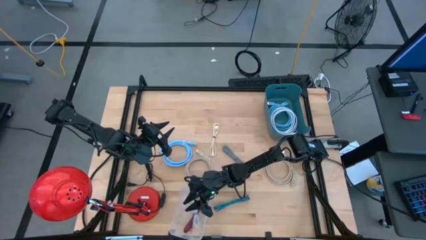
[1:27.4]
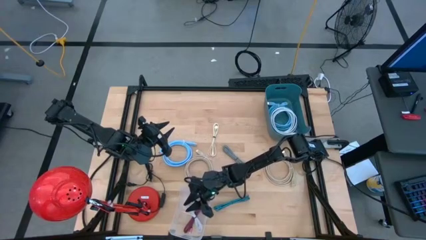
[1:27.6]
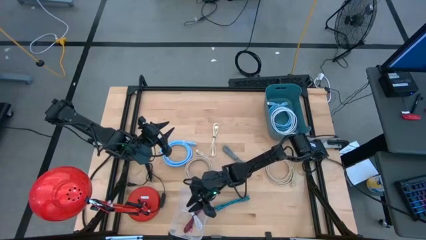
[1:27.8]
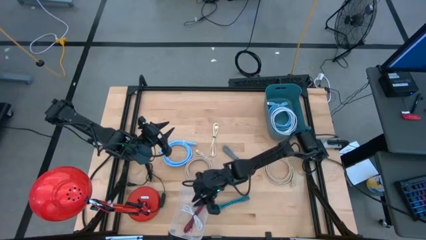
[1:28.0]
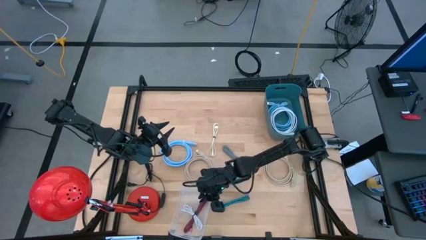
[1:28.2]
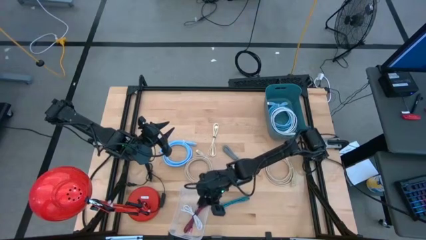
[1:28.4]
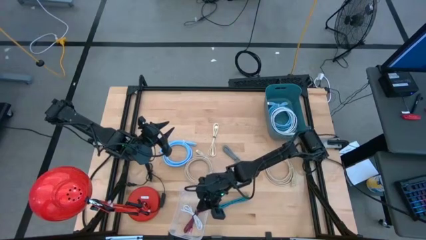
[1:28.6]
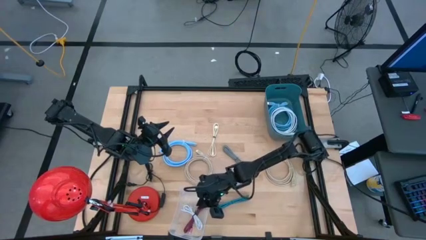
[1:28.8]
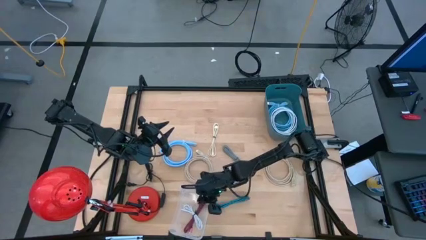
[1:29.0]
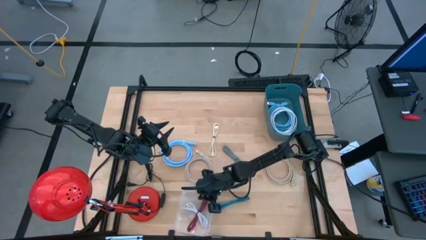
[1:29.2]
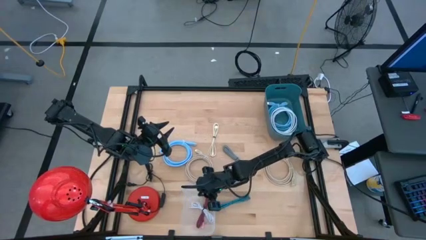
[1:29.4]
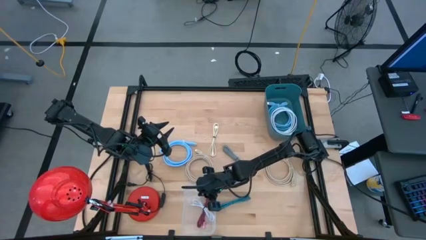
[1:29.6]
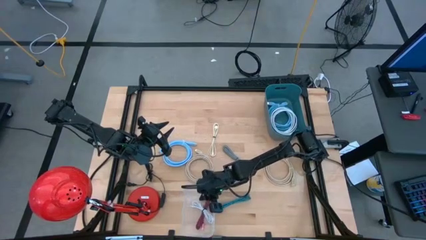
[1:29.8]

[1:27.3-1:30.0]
Task: Pick & Place USB Port
Adjust the transparent bin on the table

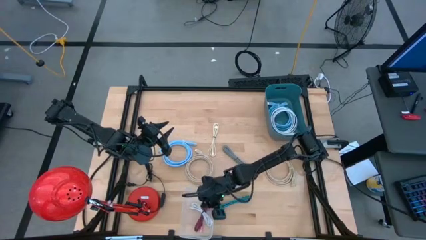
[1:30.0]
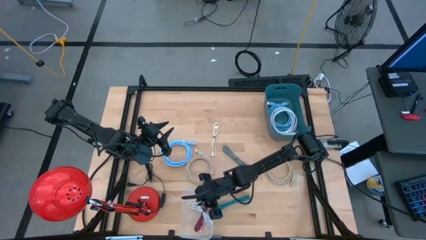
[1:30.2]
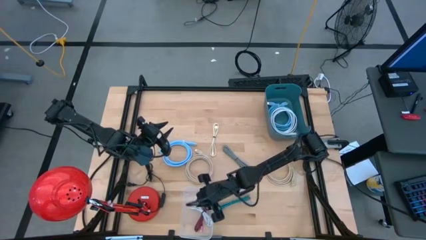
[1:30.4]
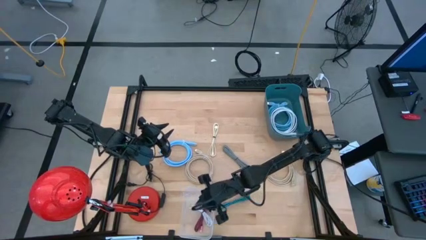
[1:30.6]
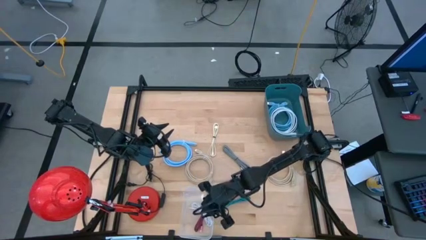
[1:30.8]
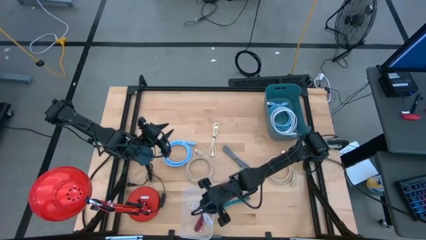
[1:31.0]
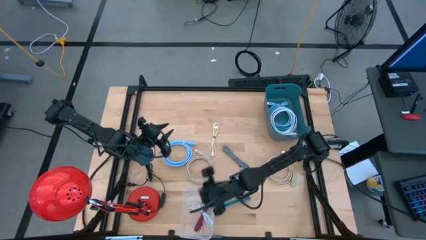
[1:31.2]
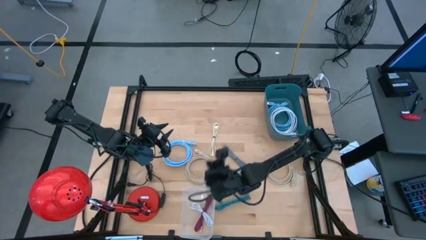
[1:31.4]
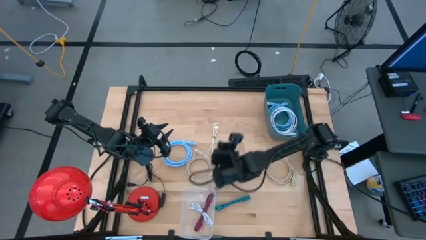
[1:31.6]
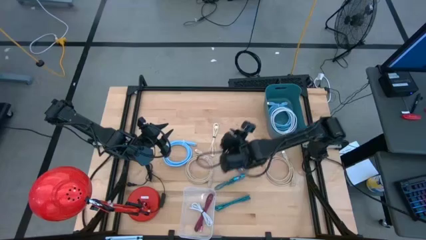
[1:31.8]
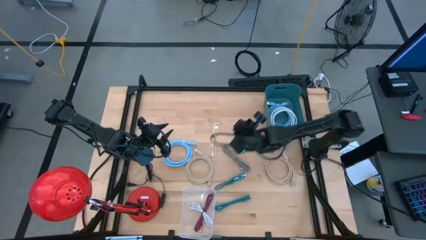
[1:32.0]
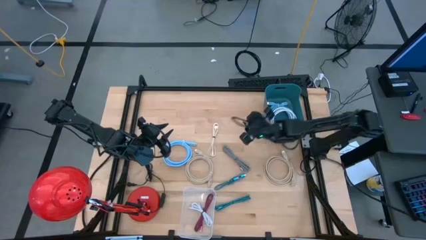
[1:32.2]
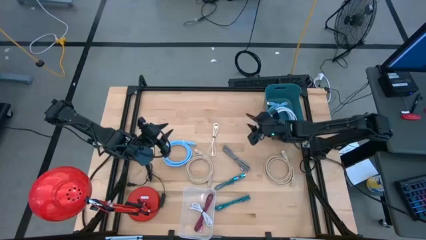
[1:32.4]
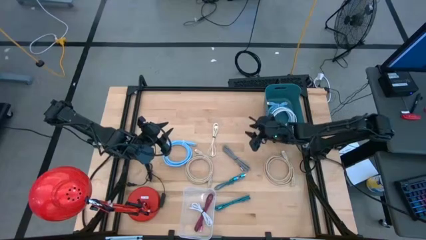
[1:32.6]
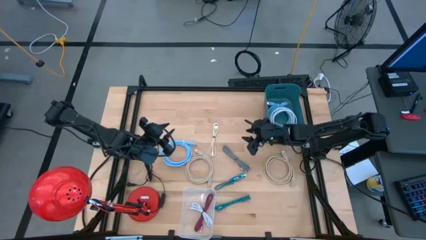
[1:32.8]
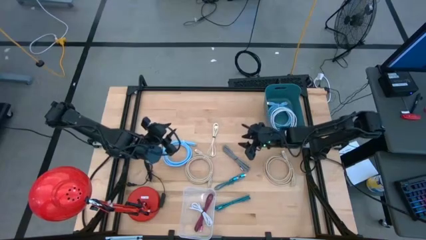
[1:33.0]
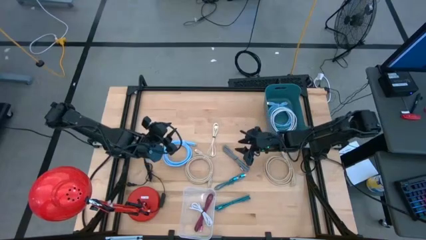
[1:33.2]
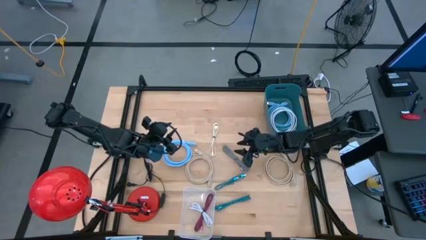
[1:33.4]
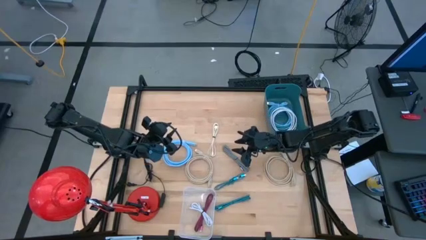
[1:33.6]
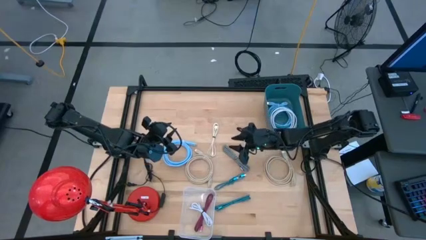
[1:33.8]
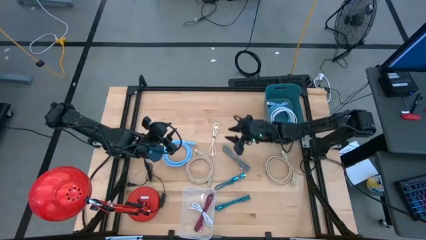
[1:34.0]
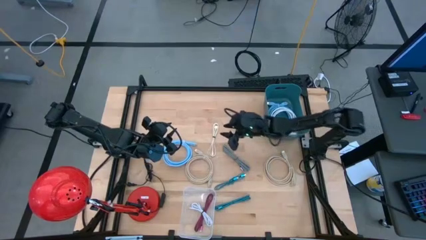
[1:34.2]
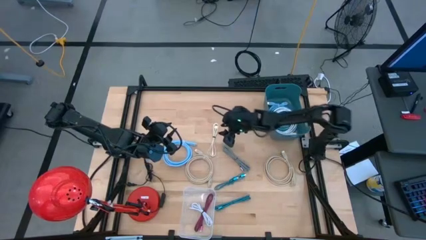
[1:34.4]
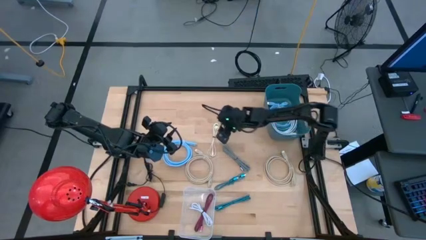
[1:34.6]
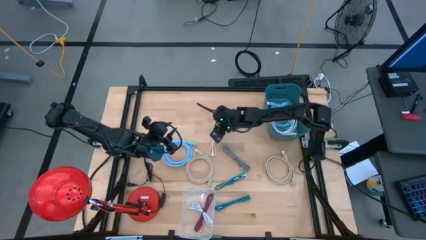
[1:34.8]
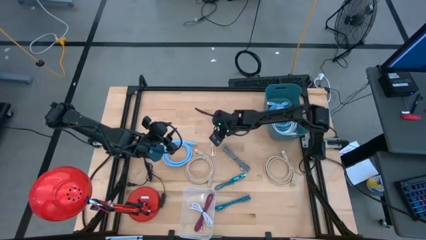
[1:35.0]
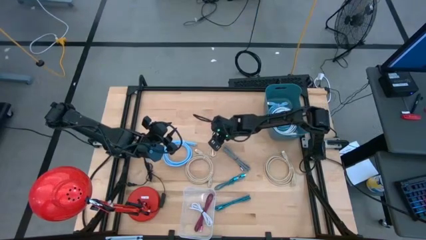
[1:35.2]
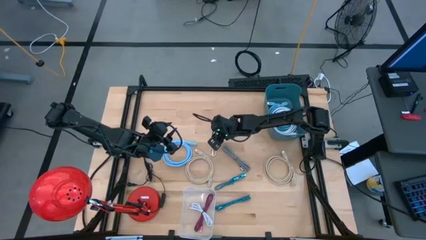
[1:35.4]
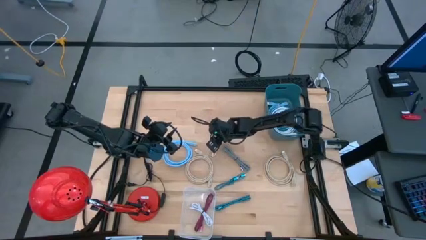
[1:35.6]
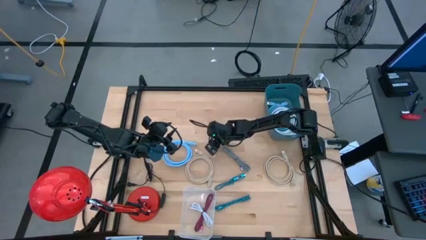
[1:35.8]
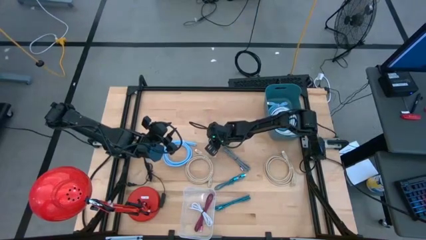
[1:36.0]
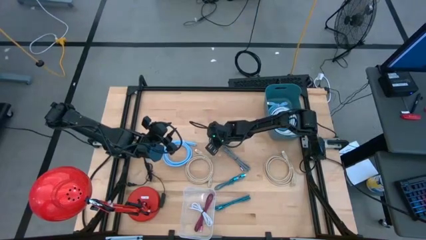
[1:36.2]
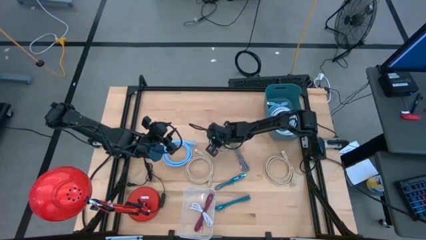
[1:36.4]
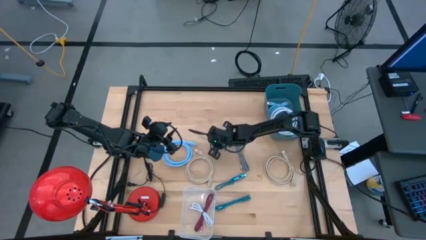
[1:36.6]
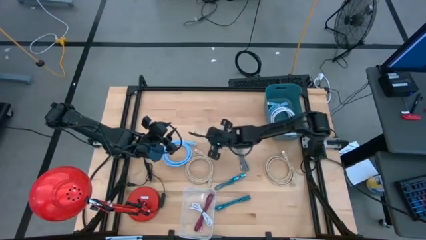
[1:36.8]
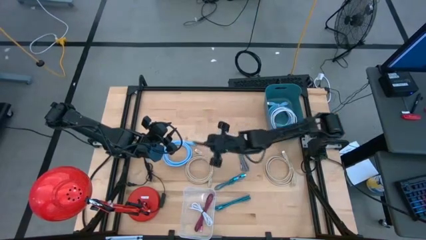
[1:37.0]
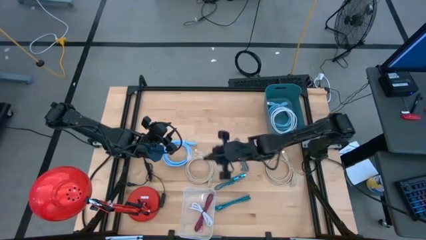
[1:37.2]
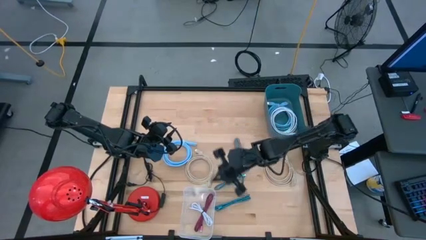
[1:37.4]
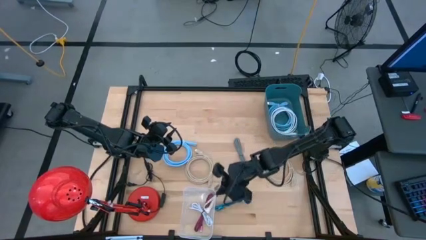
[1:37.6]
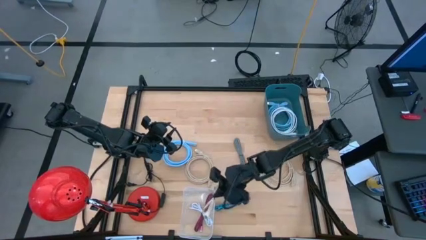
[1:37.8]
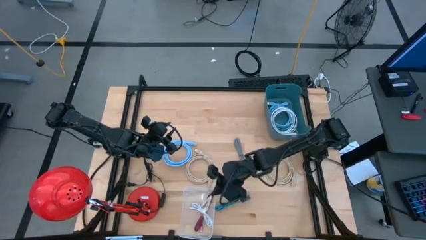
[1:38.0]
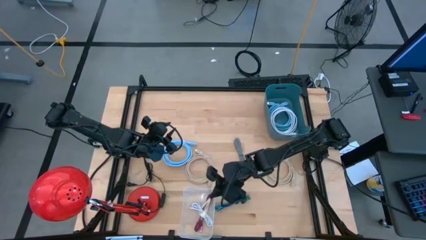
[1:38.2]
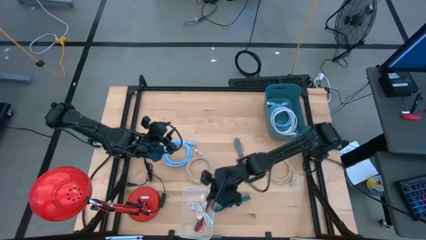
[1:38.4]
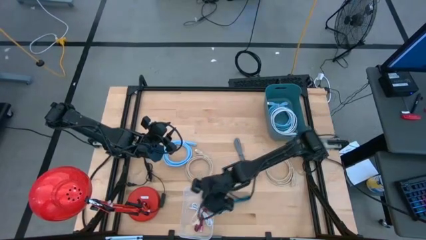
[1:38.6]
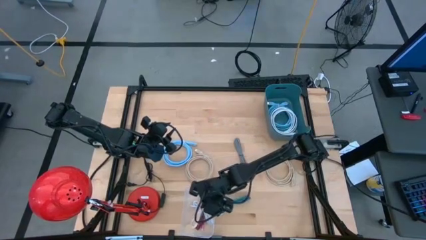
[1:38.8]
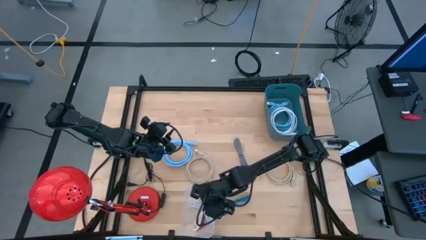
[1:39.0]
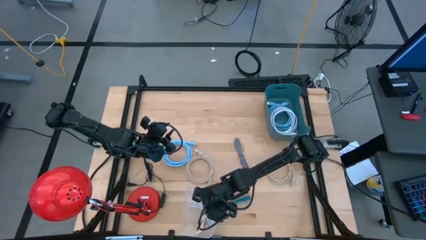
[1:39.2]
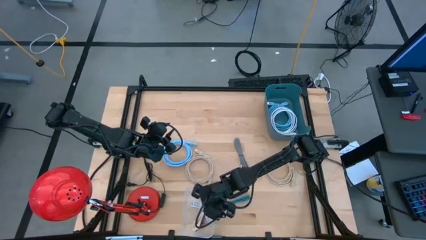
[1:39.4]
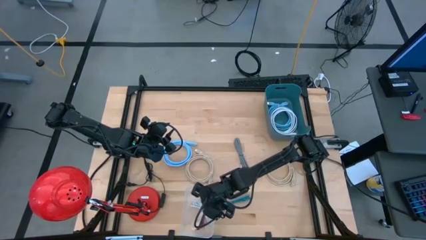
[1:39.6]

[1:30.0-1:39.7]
Put the white charger cable into the transparent bin
